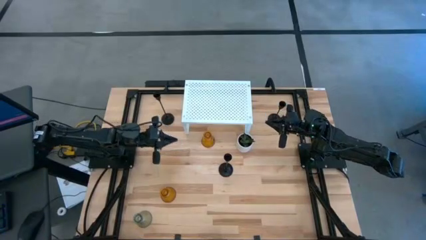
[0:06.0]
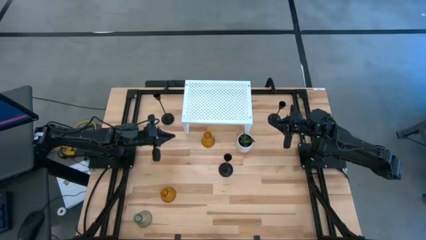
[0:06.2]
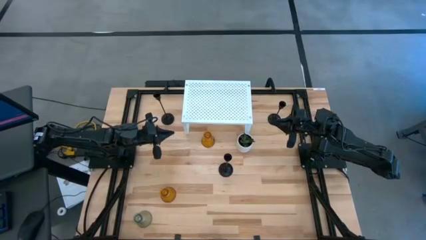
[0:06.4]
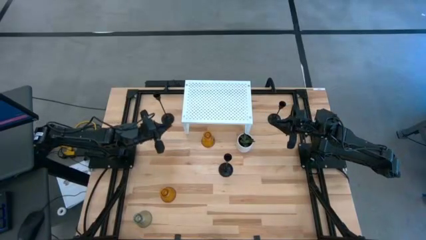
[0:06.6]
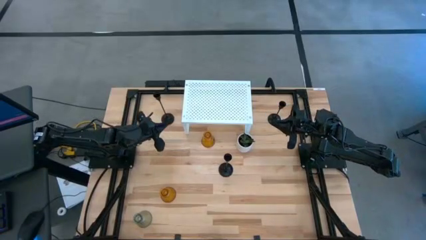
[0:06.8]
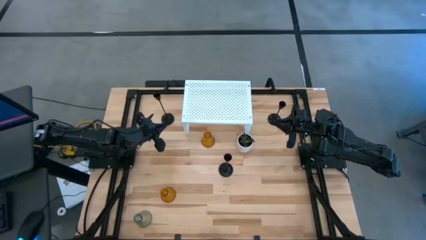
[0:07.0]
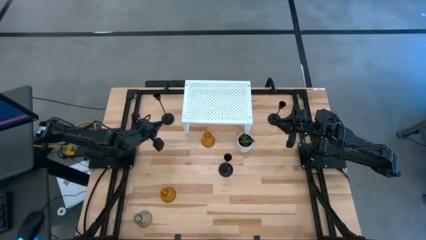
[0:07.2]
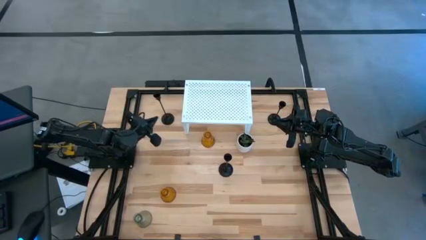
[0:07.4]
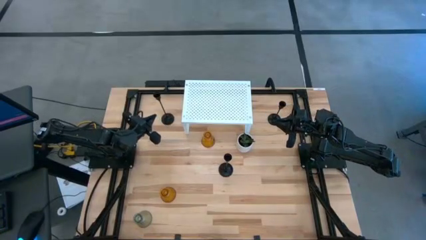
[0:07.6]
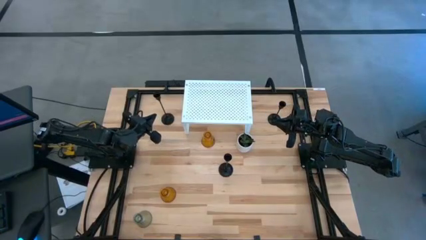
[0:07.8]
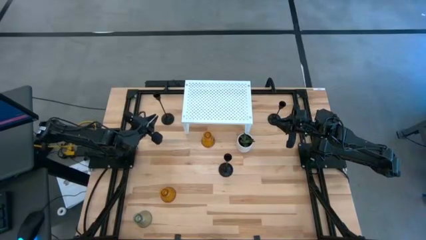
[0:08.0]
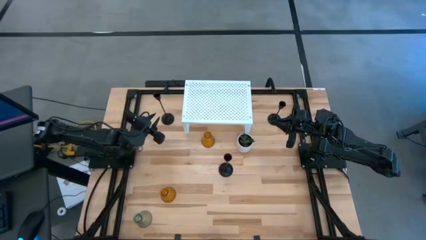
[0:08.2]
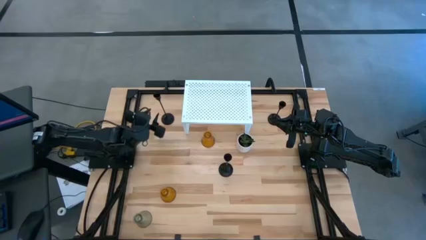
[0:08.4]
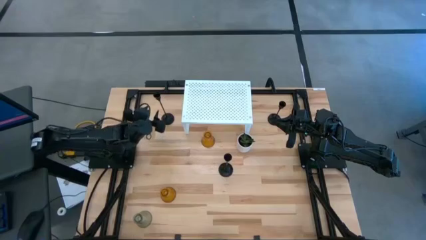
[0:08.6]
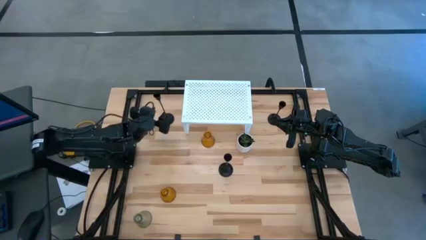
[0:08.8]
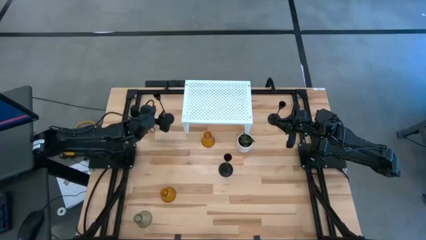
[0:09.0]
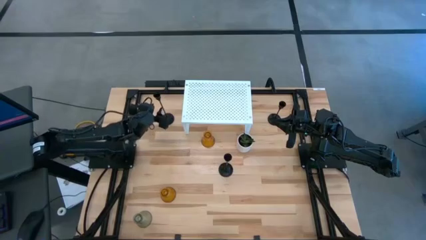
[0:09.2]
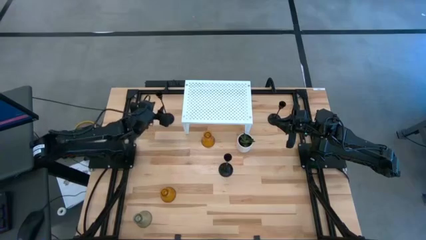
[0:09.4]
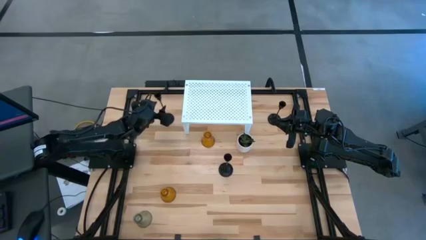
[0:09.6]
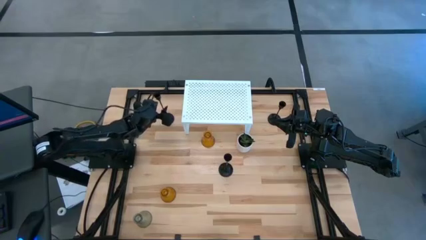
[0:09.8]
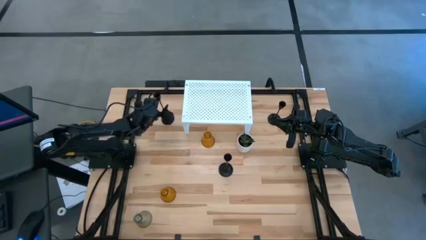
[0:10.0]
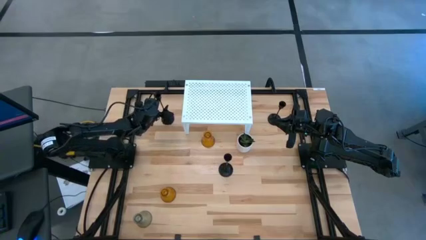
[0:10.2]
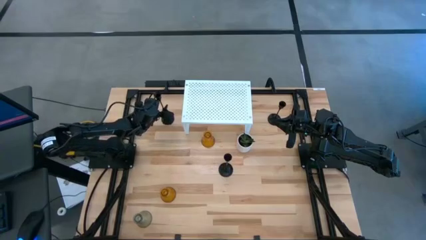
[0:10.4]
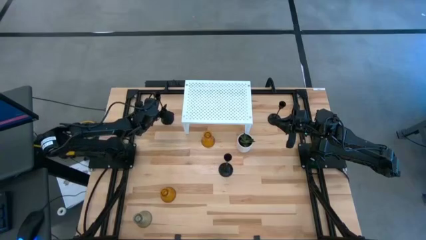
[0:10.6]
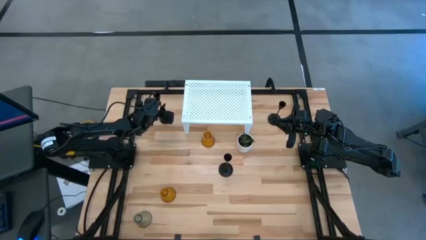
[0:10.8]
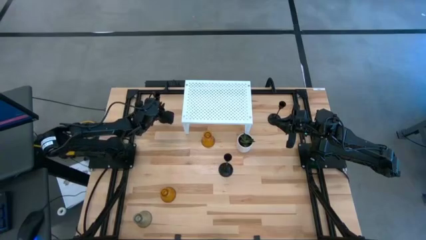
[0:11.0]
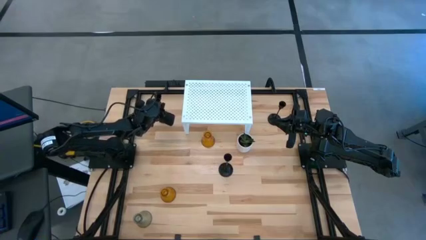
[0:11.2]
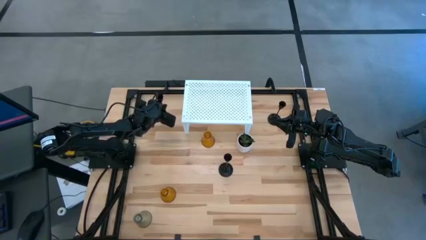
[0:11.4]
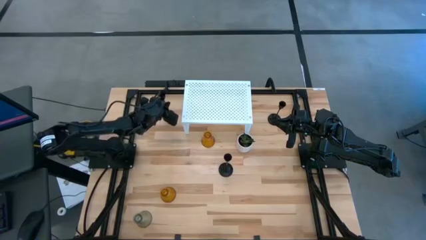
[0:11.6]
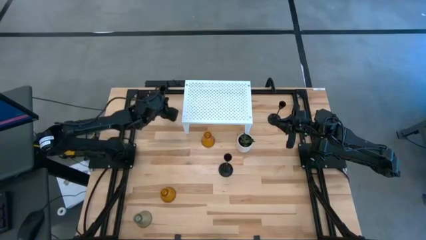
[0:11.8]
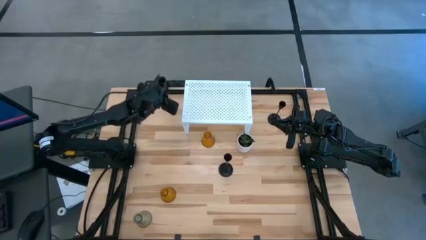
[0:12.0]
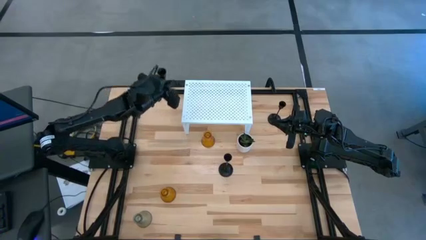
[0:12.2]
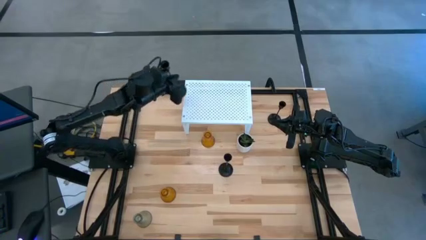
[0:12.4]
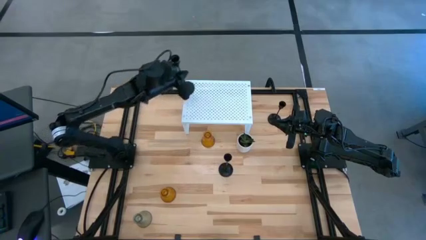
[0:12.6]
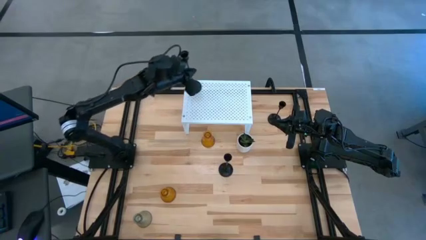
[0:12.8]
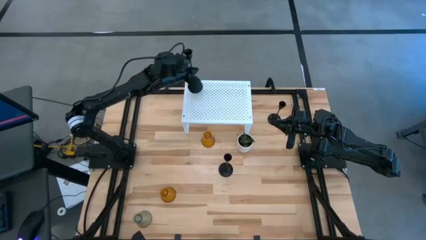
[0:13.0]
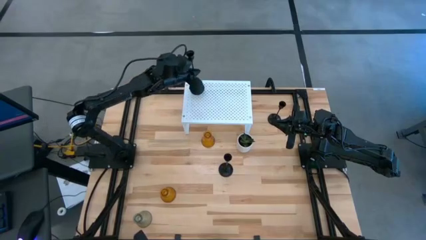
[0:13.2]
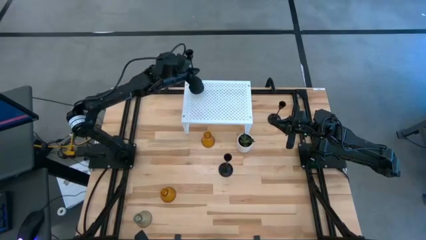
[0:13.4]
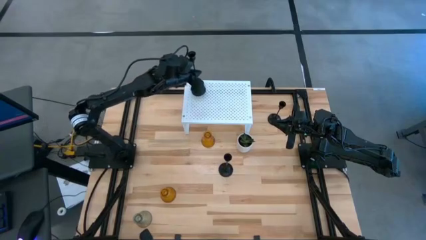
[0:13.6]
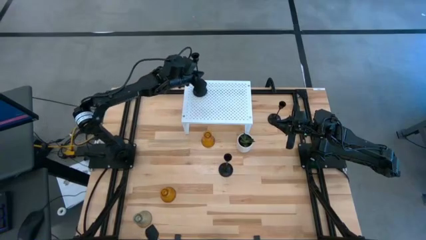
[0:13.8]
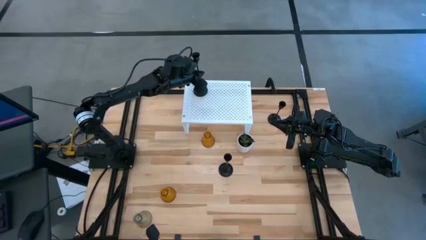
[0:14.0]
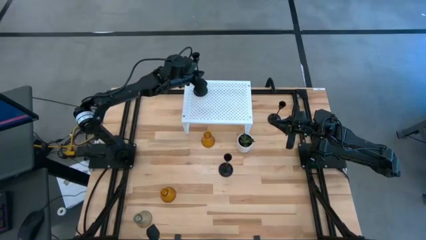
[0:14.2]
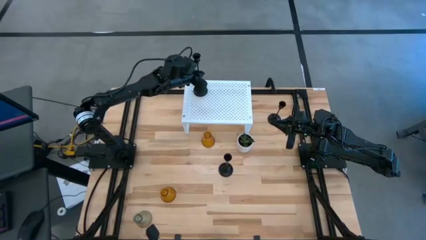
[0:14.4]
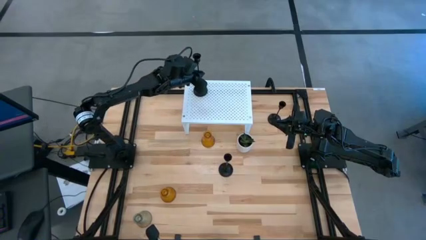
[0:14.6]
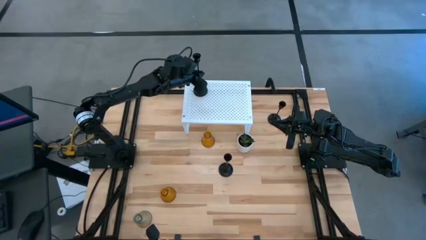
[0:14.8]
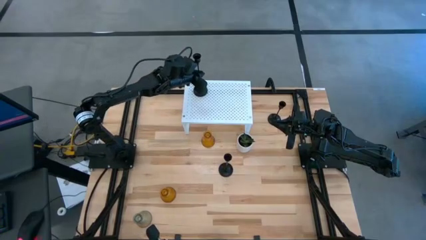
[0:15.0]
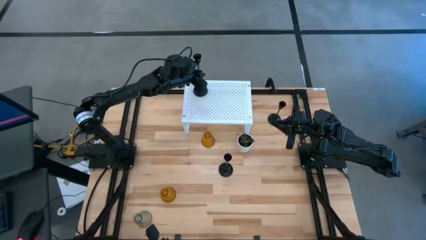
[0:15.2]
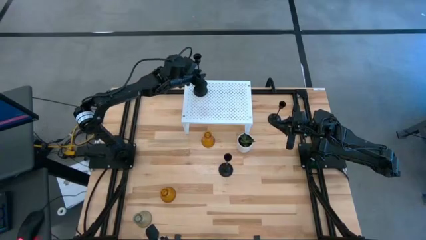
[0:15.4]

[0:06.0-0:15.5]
Task: Pick & Place candle stick holders
Put the left black candle holder on the shelf

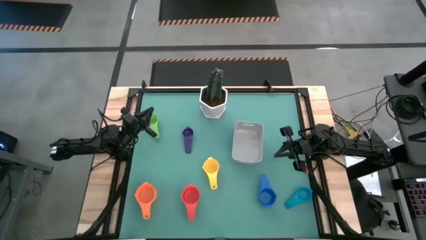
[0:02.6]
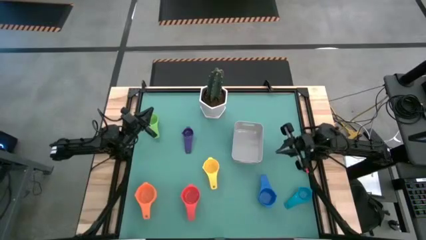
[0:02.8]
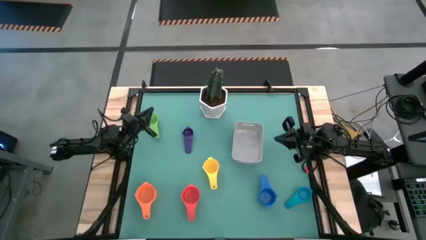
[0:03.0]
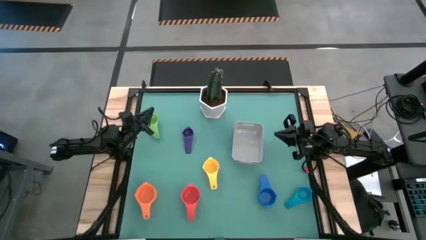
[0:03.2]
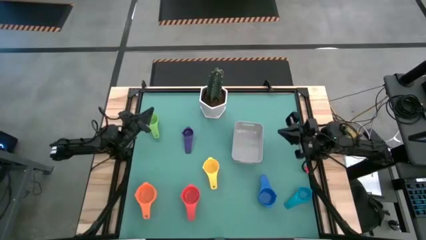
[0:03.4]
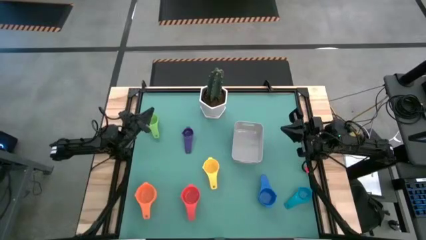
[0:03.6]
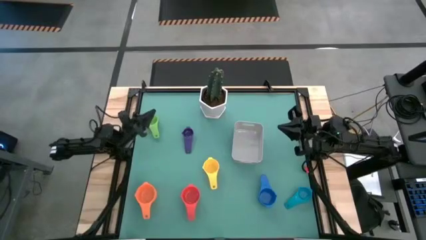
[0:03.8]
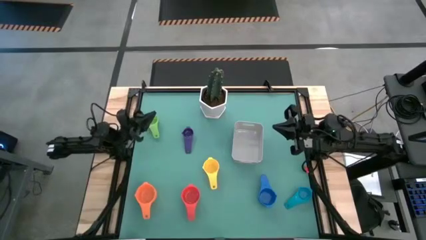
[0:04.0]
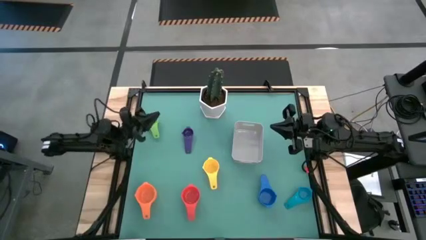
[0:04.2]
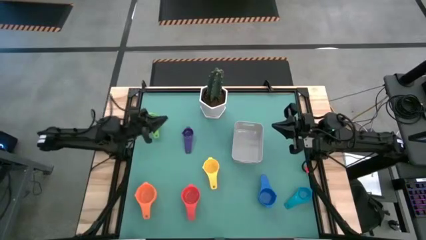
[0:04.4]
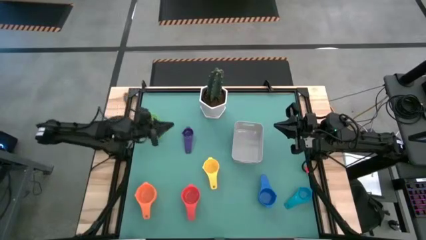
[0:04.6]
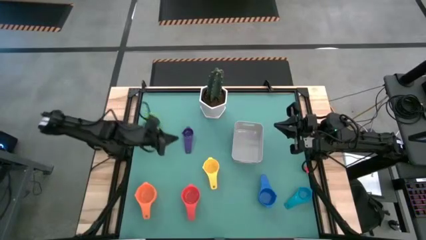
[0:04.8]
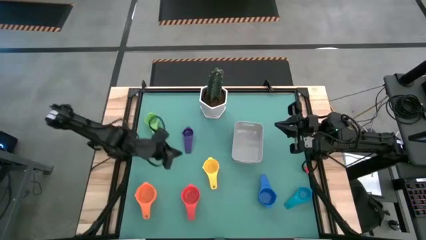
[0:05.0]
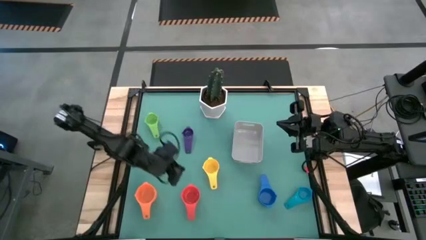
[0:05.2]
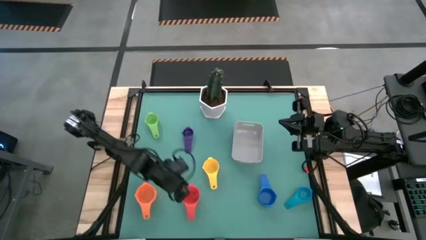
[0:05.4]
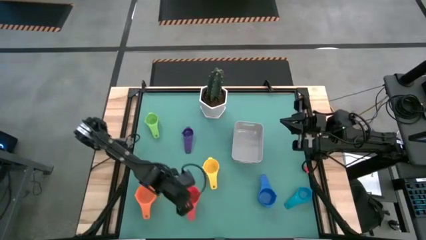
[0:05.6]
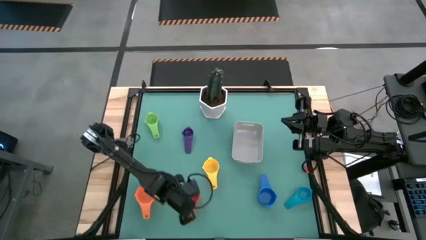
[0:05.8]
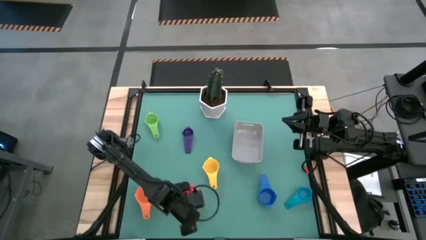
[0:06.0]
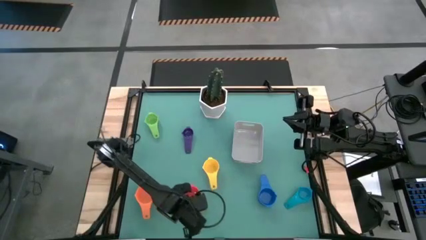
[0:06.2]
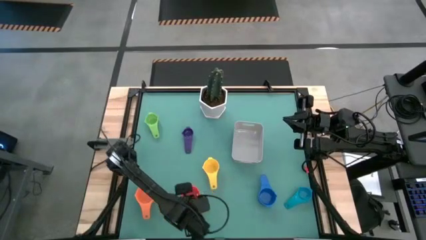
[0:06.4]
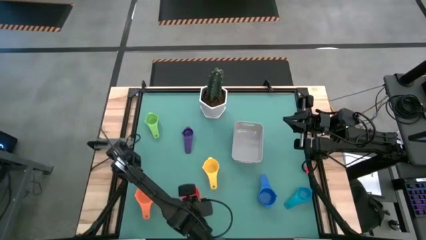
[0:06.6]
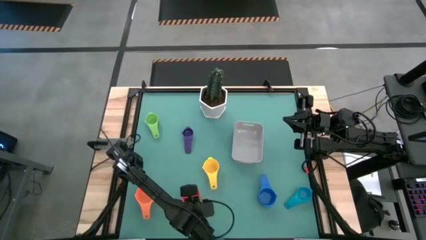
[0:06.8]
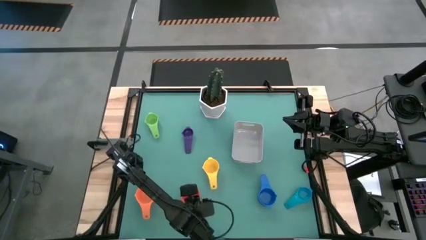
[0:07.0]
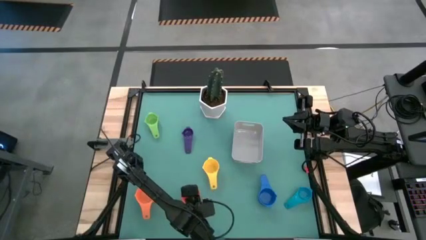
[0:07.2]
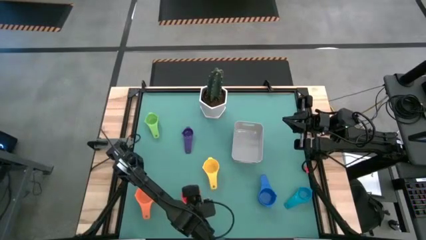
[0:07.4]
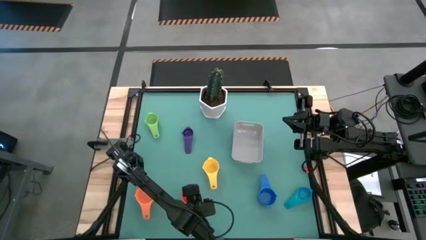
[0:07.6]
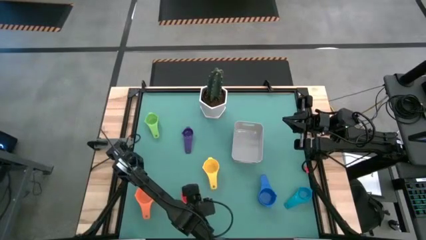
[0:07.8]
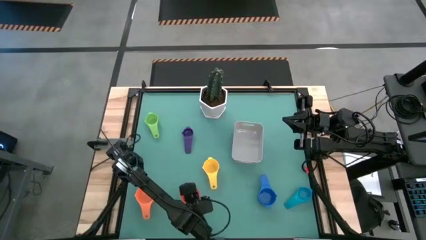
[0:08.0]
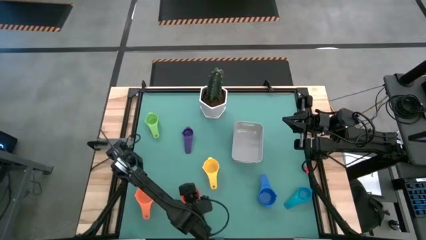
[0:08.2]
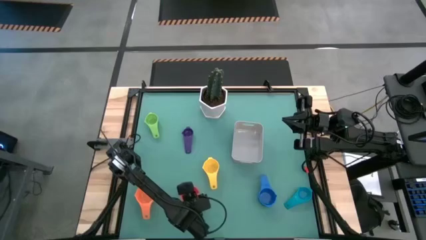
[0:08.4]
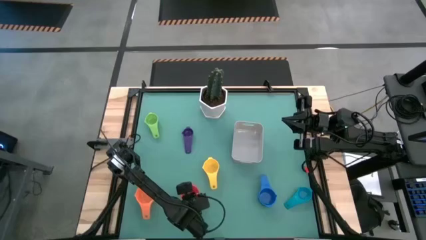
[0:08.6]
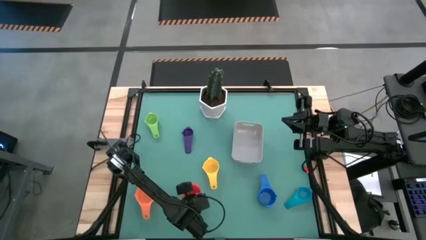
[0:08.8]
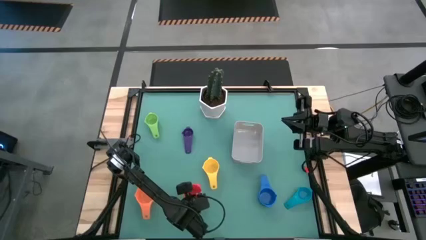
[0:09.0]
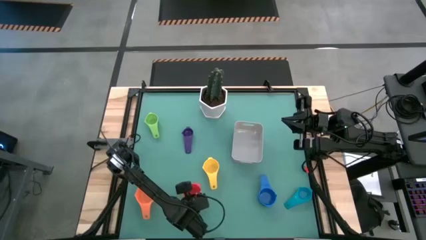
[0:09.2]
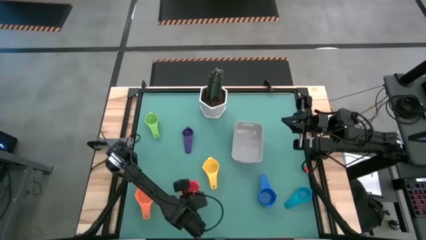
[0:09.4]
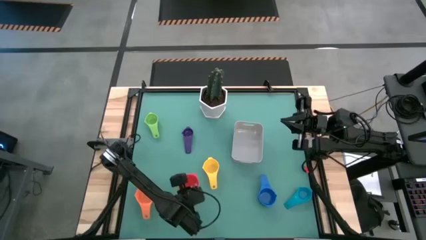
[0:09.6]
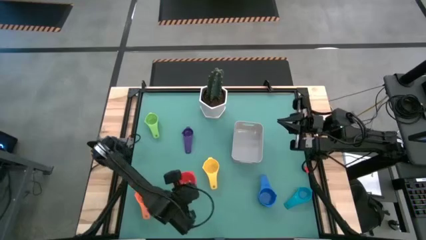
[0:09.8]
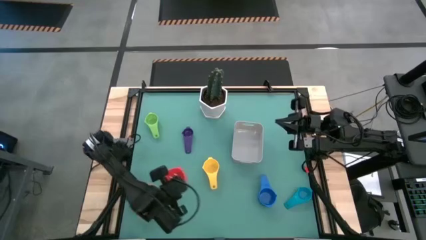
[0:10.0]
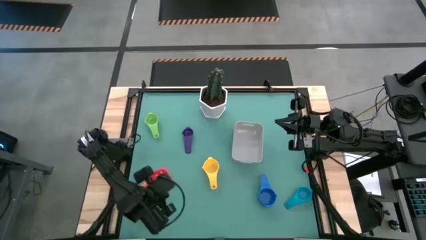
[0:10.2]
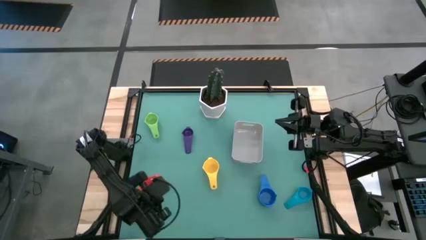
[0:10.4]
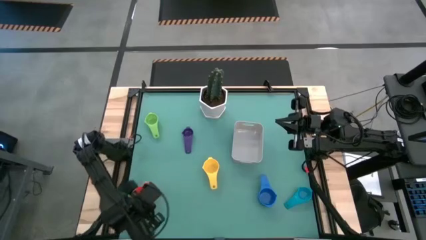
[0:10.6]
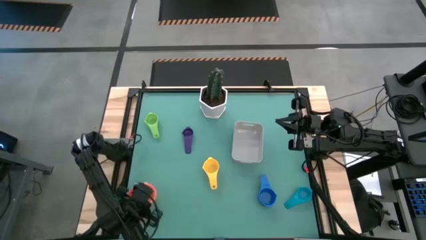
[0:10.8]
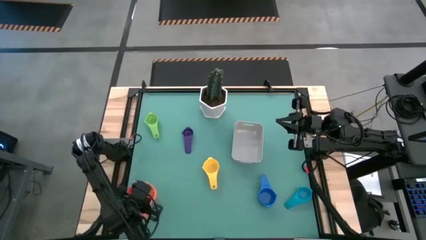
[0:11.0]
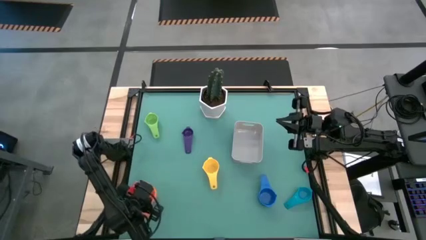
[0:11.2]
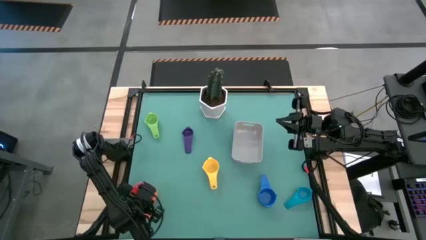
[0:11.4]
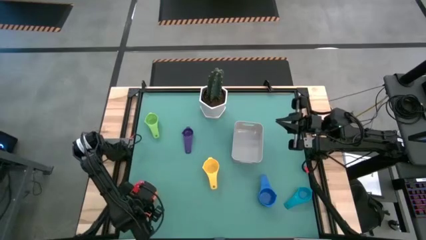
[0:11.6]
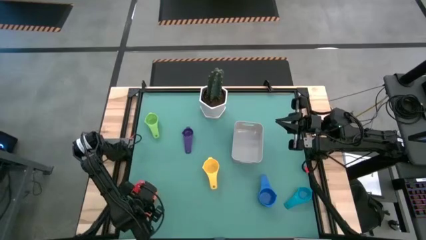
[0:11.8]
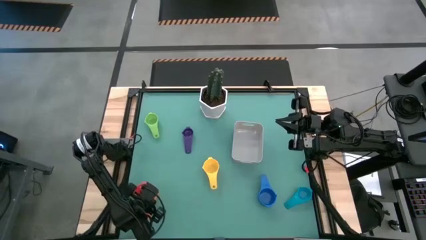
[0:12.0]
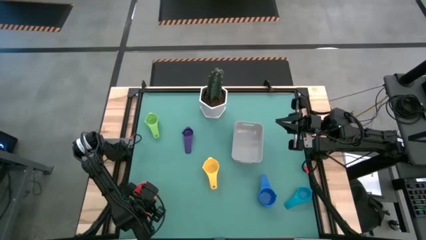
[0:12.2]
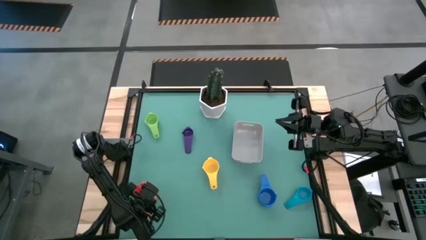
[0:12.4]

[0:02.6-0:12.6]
Task: Nest measuring cups in basket
Stack the red measuring cup on the top of the orange measuring cup
